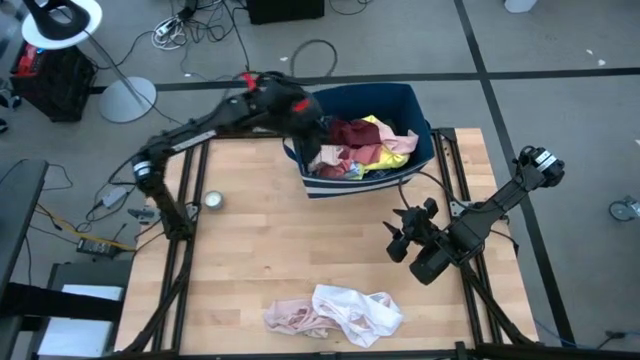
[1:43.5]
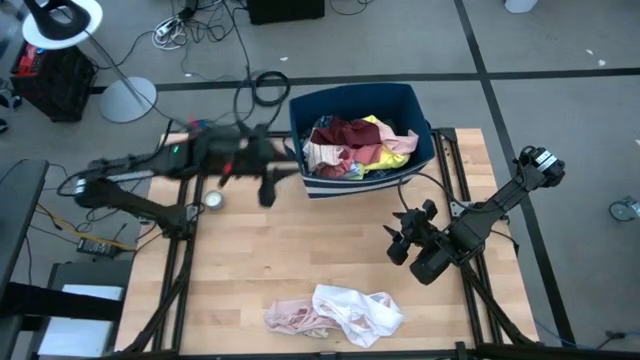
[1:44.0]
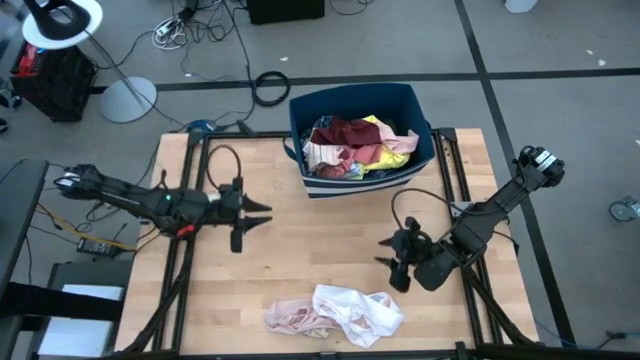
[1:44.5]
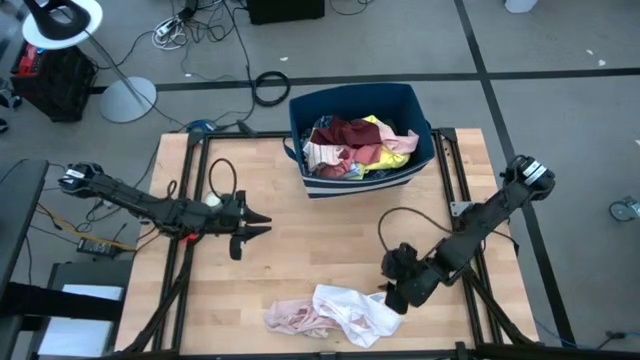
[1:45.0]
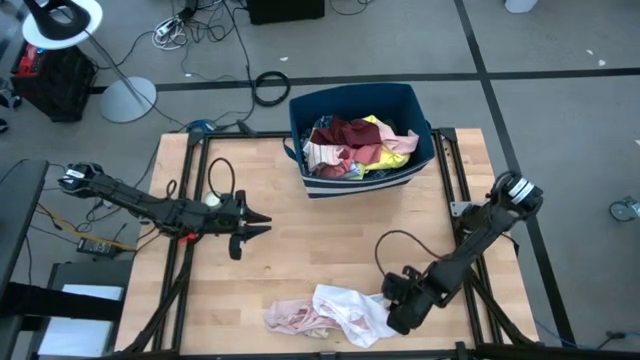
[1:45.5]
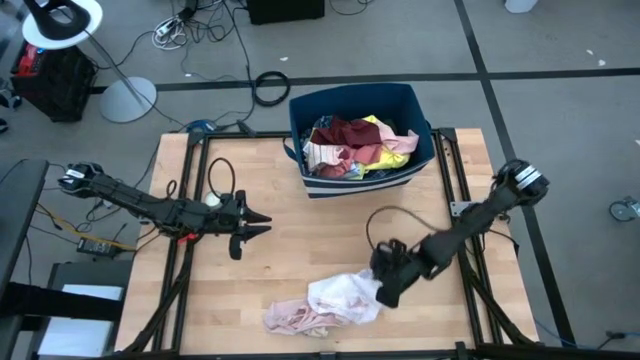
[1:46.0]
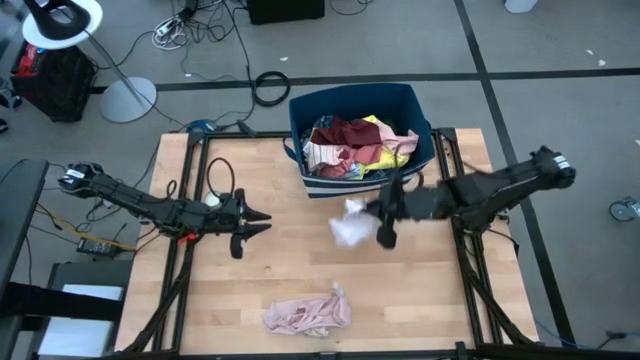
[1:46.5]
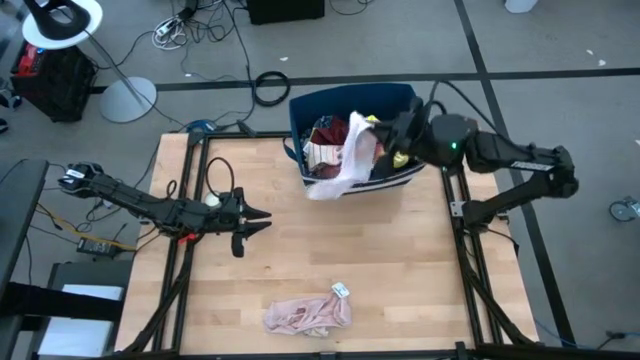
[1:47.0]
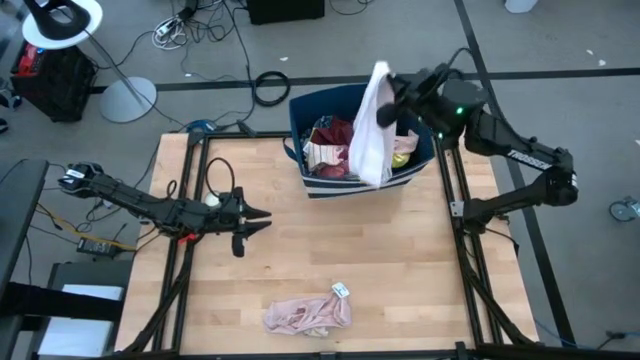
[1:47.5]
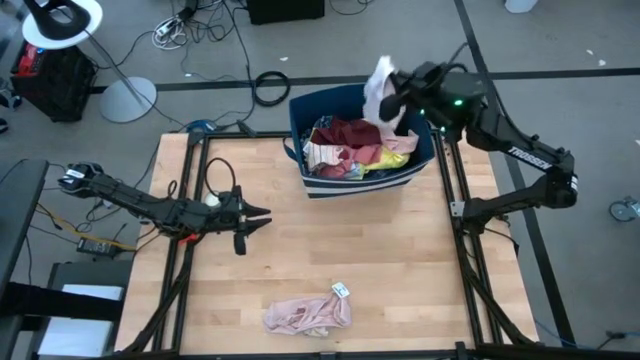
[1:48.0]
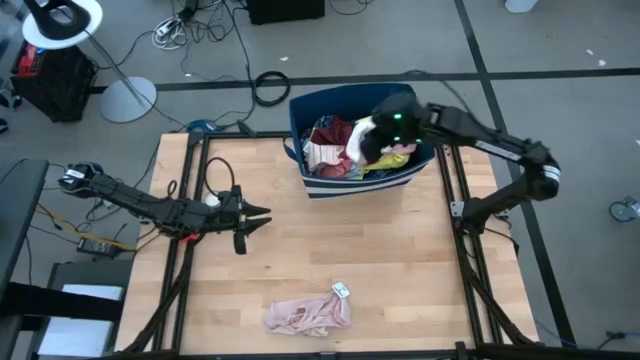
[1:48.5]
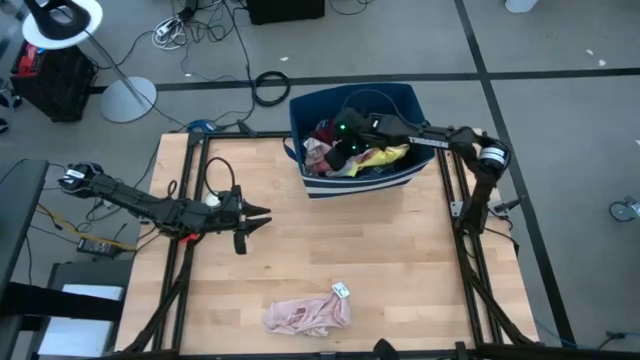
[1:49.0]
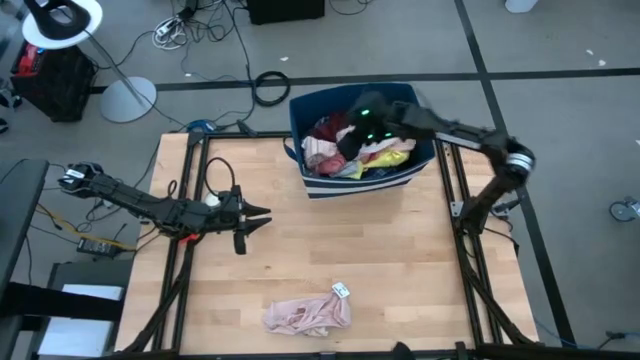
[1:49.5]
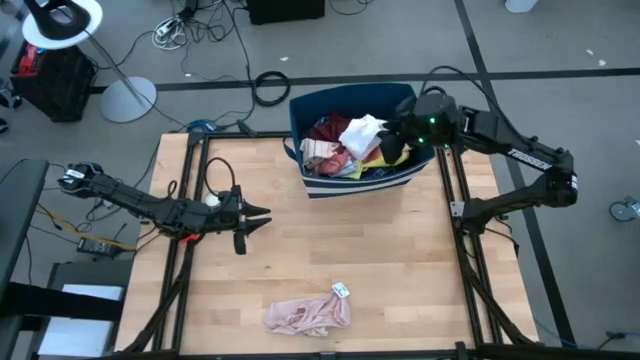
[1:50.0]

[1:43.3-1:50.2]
Task: Sort clothes
Put the white underwear into the blue laundry bin

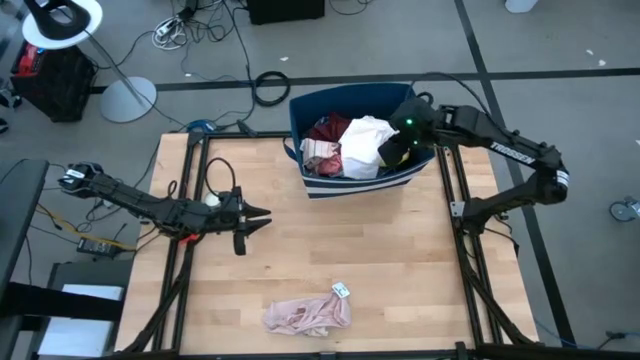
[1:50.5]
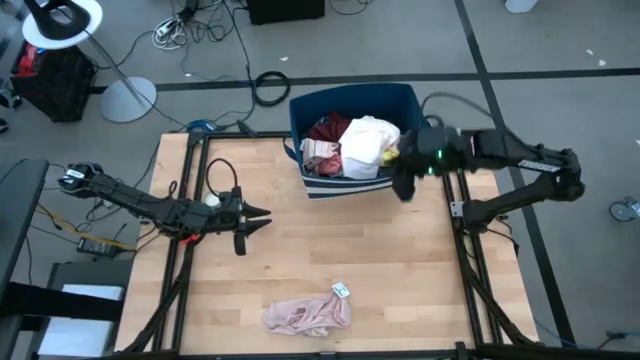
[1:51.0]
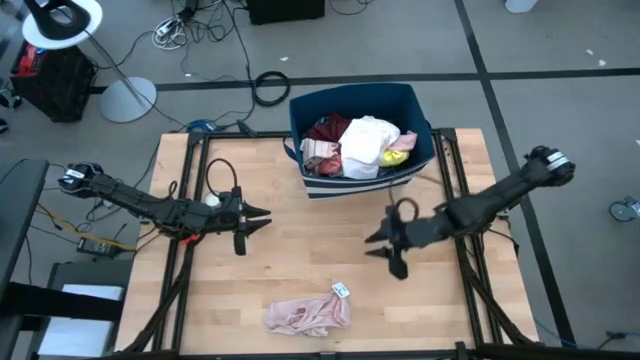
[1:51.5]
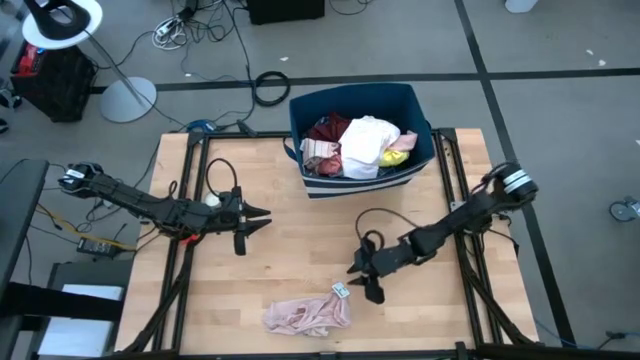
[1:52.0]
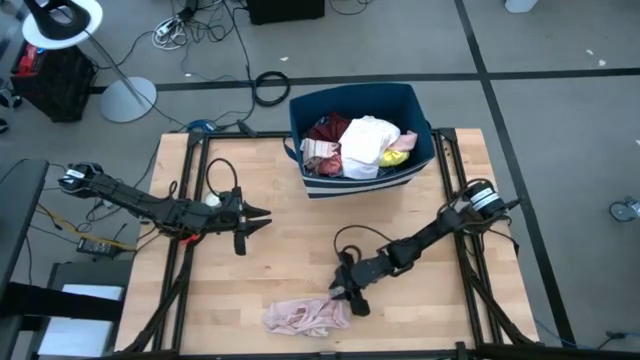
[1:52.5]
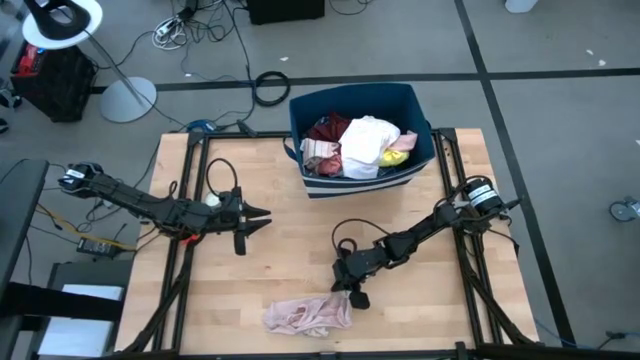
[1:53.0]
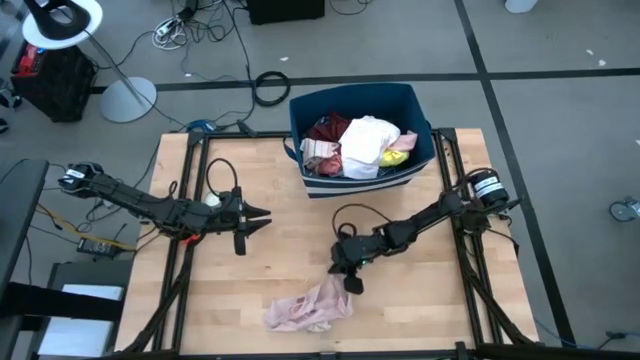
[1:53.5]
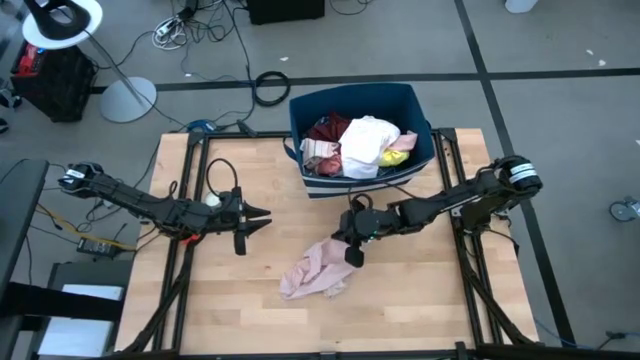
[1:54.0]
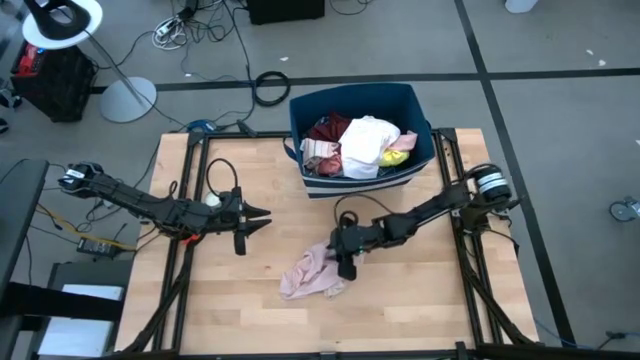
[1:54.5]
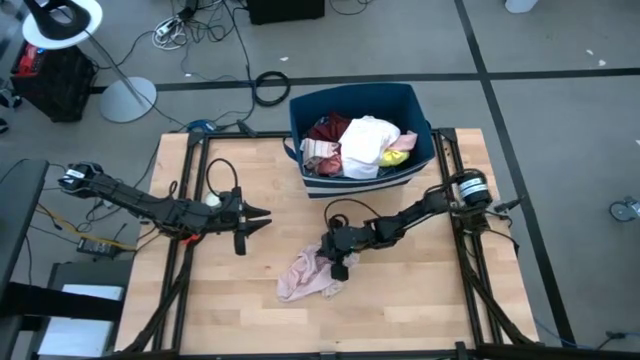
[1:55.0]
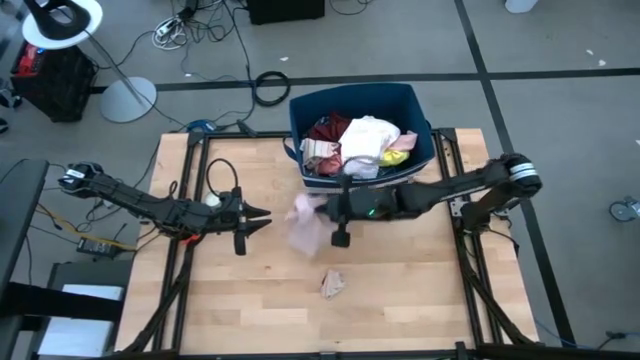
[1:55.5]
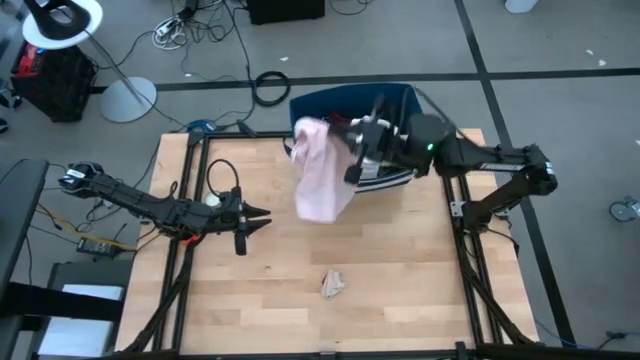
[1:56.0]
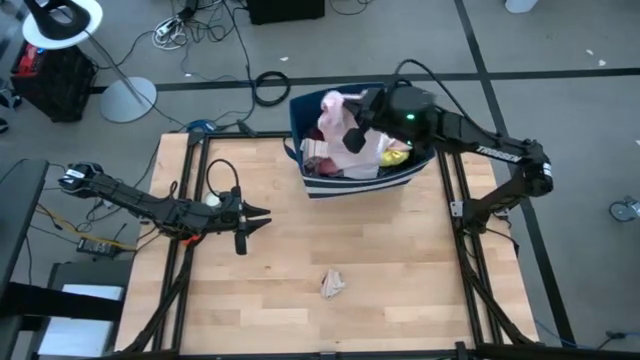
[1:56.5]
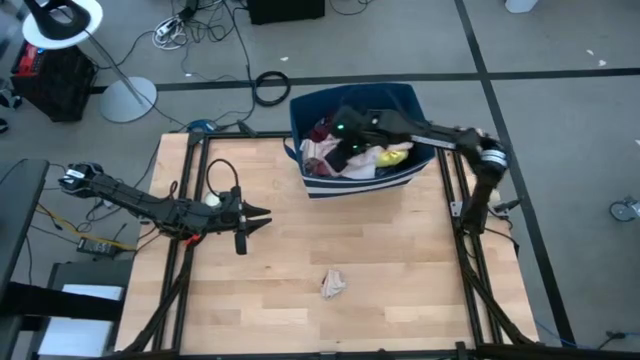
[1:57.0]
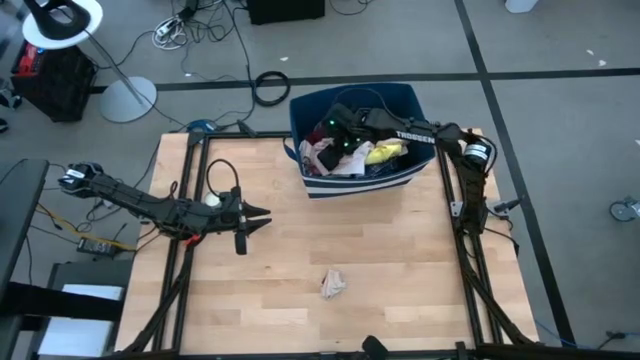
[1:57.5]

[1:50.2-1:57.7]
Put the light pink shirt into the blue laundry bin

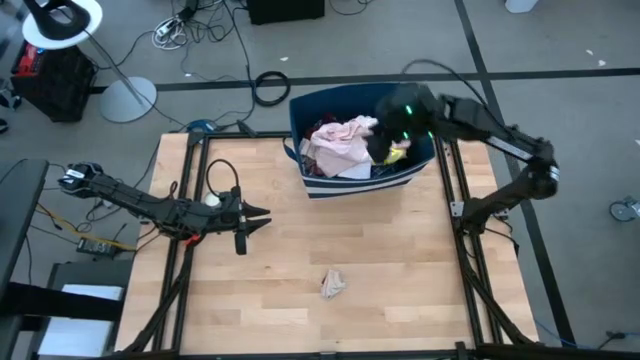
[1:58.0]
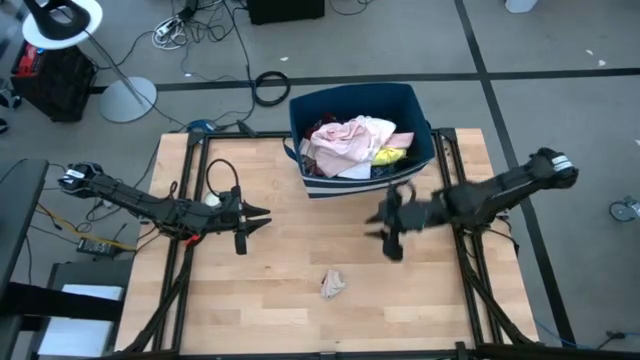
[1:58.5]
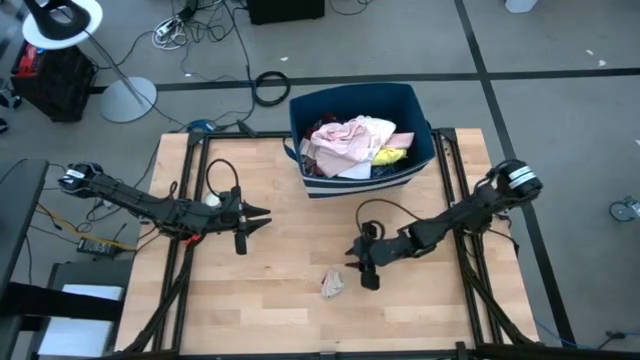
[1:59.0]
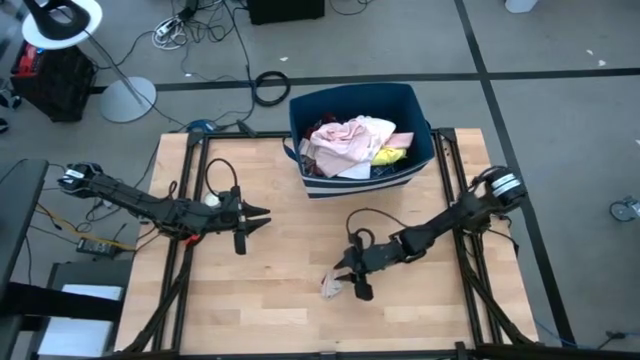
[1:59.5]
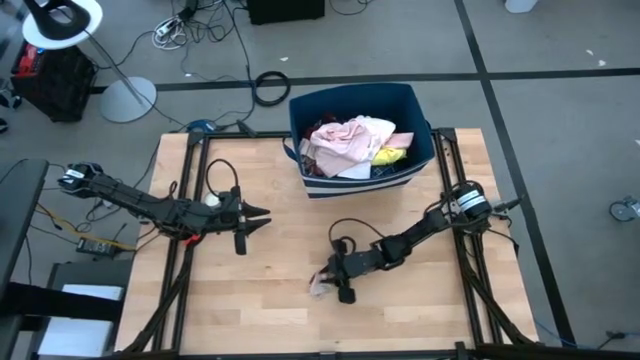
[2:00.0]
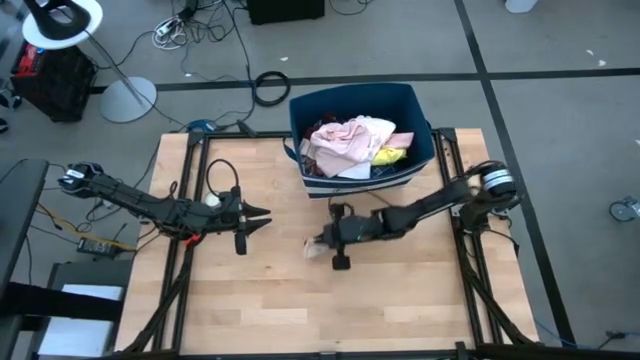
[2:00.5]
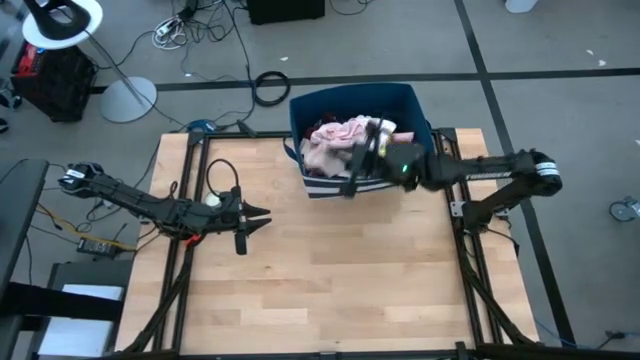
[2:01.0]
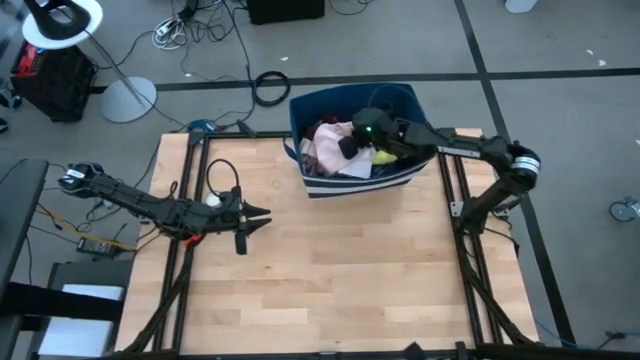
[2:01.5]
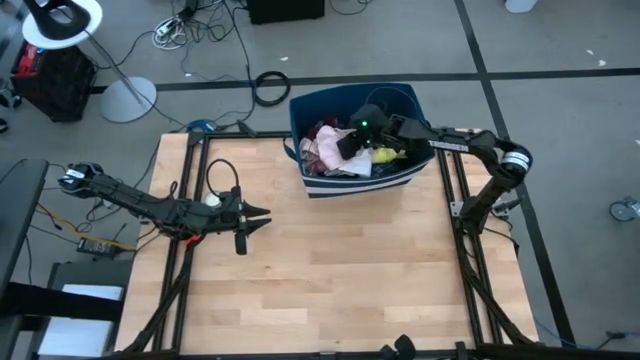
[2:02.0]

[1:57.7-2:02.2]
Put the brown striped sock into the blue laundry bin
